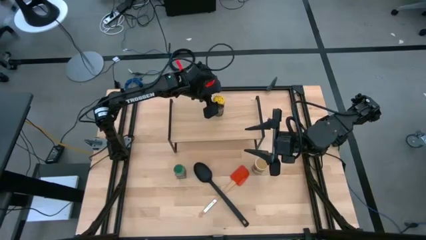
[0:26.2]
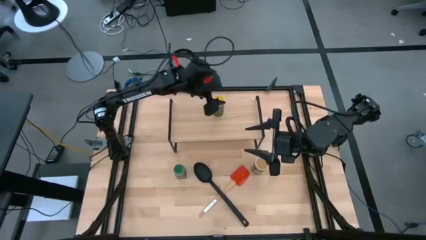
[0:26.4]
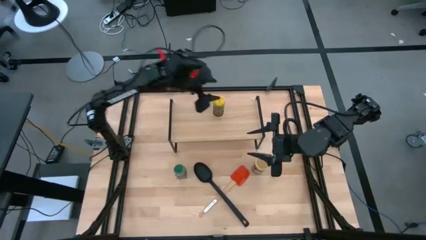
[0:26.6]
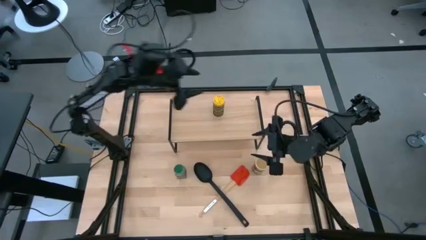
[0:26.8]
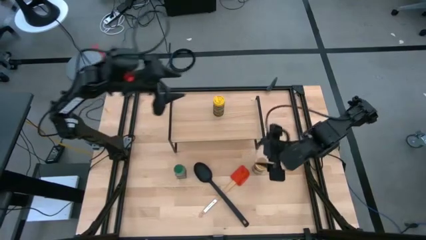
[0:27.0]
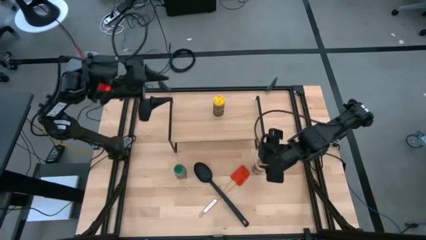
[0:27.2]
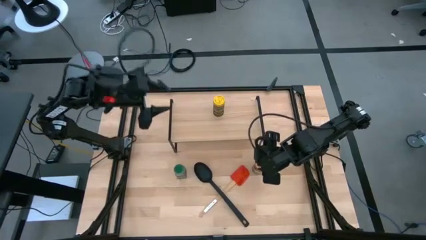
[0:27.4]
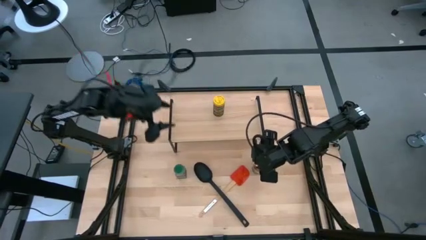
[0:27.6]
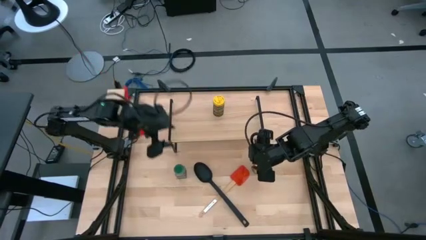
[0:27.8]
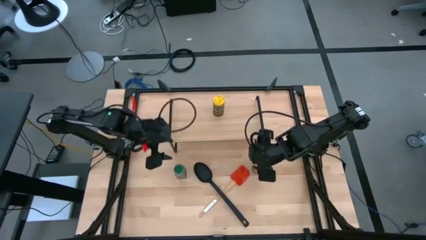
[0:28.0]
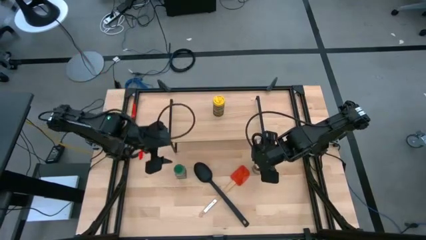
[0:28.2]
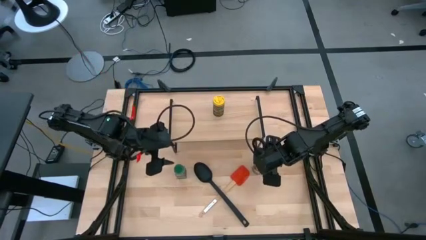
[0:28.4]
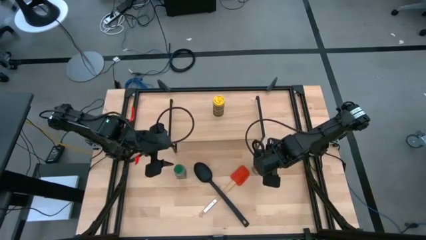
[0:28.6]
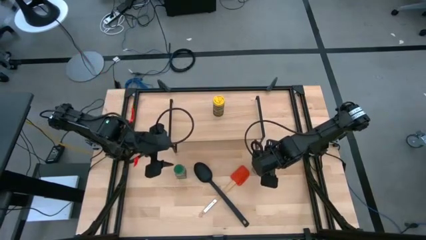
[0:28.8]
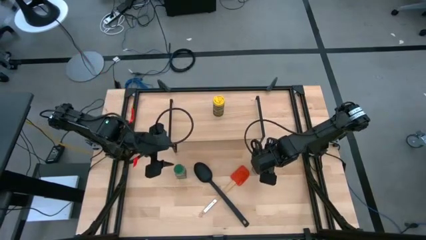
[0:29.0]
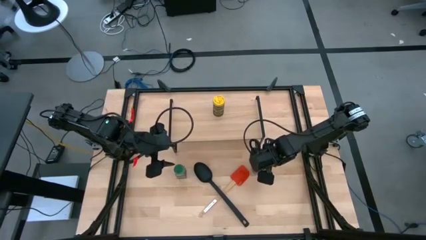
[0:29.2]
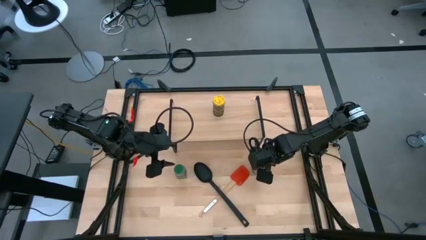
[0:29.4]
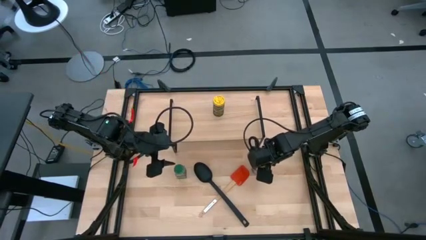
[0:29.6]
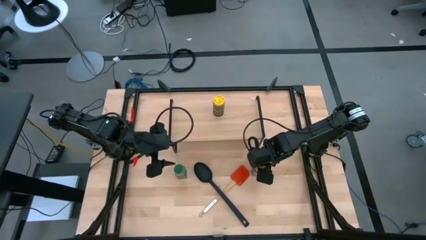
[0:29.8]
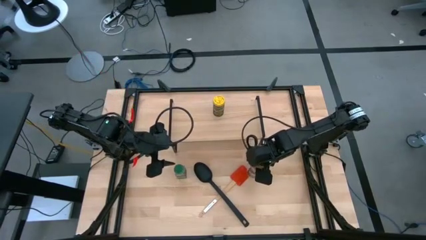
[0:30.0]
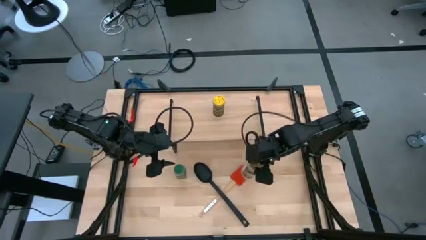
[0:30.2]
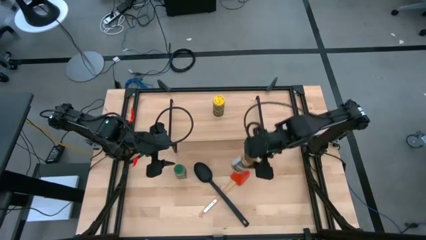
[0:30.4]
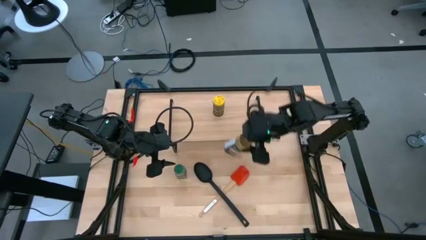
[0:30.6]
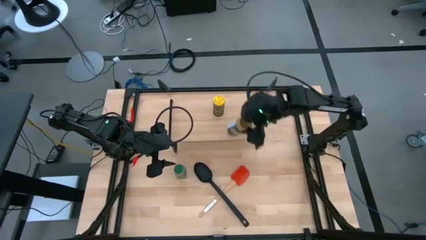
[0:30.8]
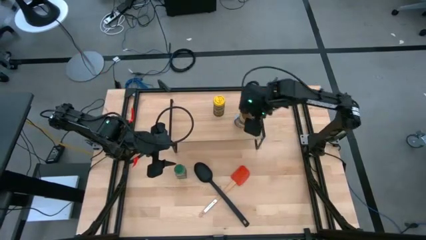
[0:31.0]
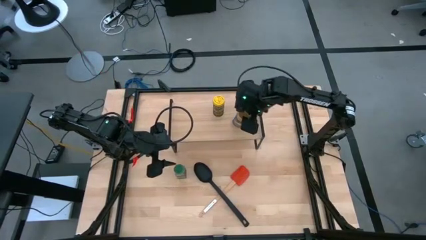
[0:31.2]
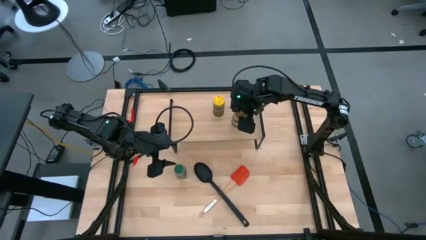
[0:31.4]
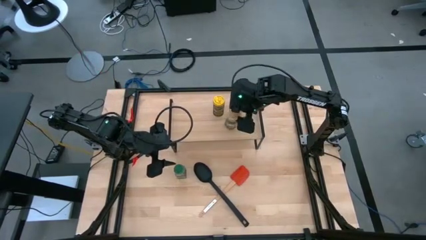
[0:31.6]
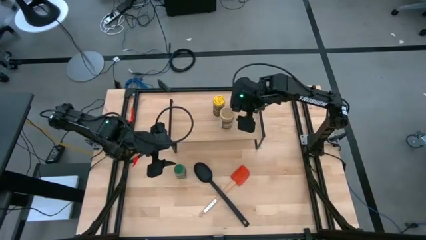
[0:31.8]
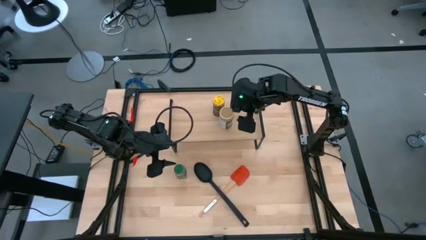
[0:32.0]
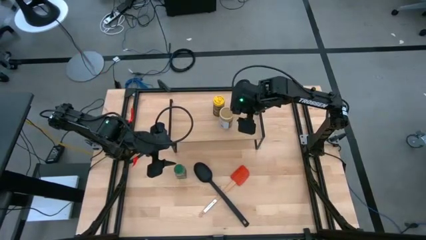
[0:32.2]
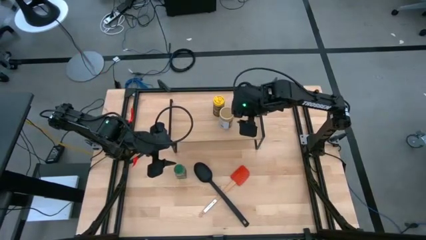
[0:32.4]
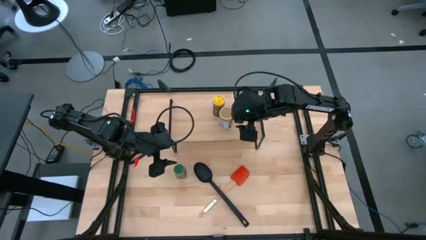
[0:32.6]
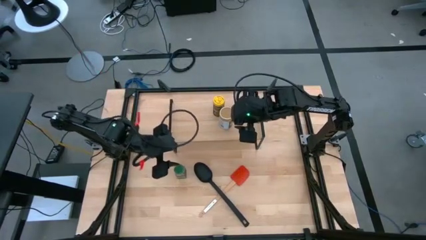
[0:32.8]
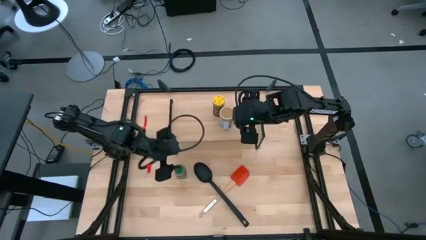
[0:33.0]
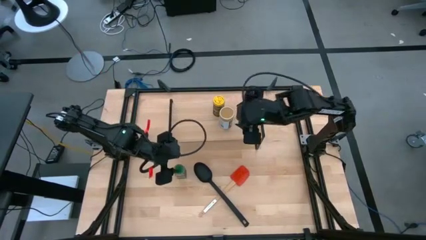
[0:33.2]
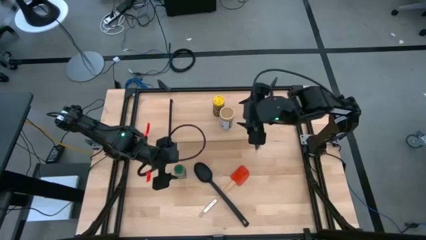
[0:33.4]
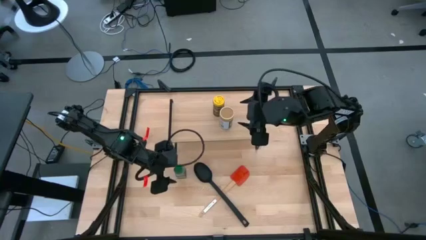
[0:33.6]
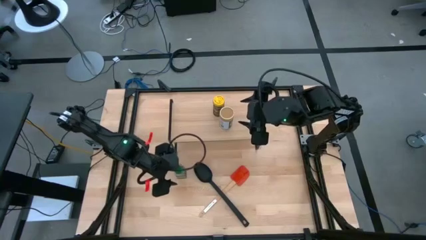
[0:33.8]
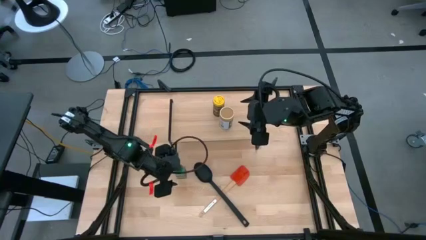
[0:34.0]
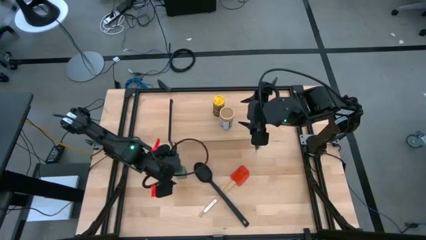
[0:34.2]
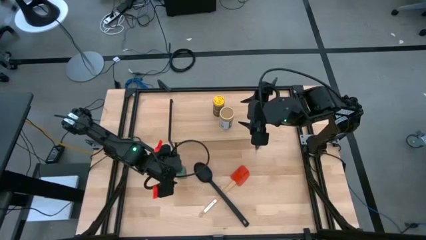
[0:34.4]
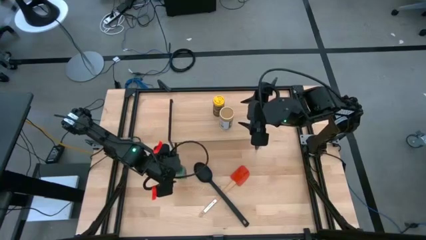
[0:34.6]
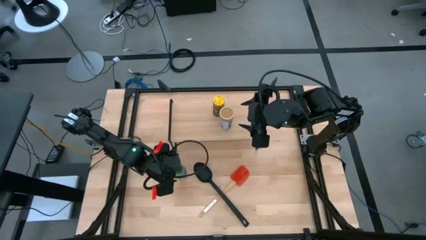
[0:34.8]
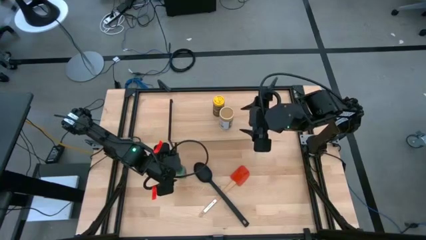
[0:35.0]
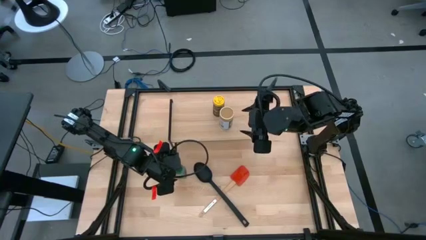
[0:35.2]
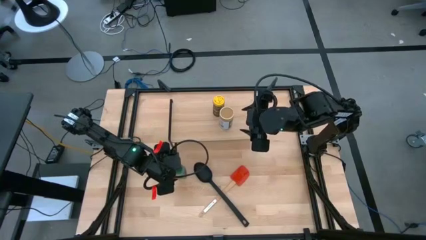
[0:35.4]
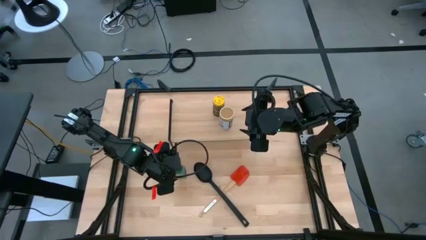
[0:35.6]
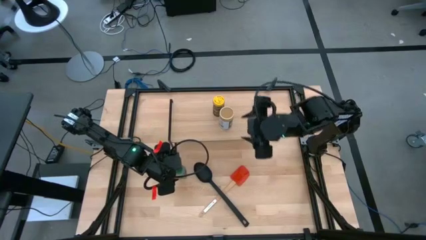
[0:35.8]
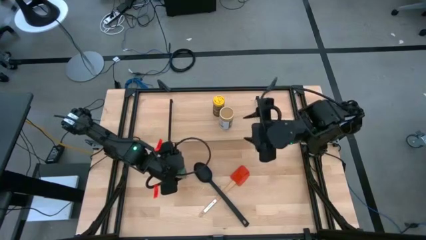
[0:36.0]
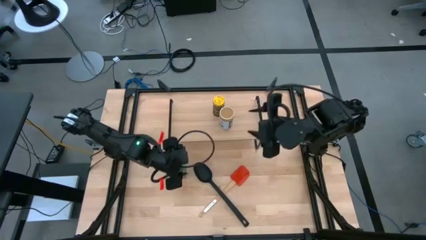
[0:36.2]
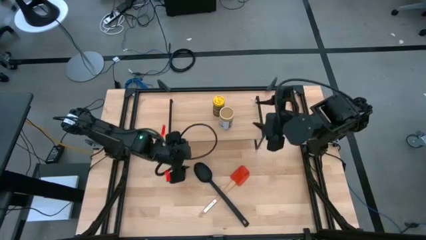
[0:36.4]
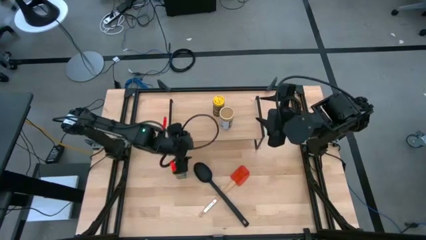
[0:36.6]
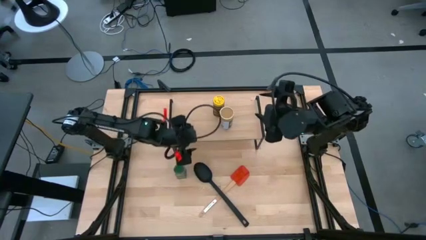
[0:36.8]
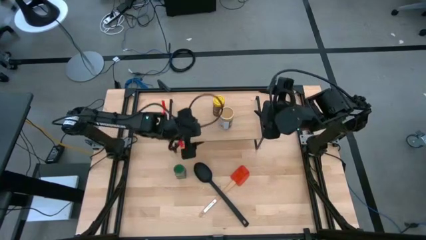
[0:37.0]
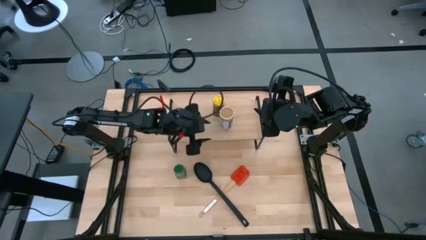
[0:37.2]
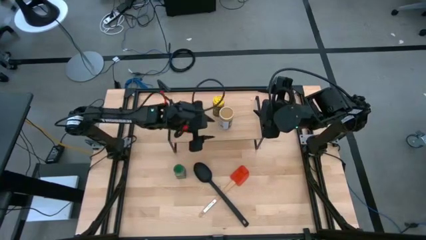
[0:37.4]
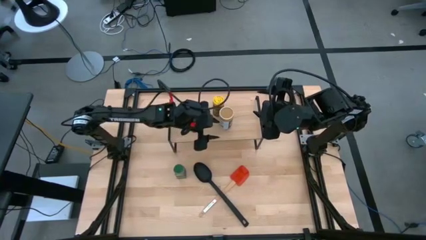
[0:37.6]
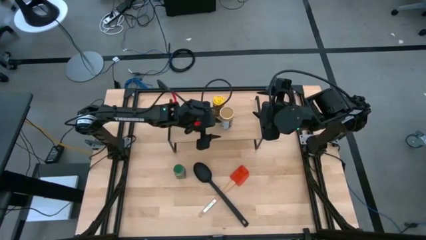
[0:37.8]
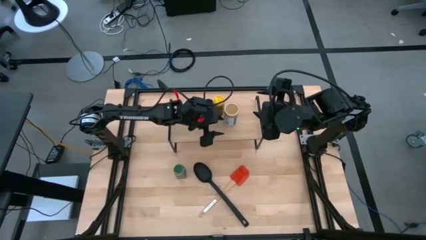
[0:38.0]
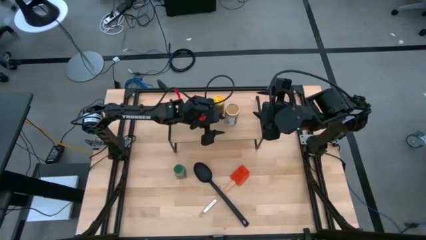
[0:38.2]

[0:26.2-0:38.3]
Task: Shelf spices
Put the brown seasoning bottle on the shelf
